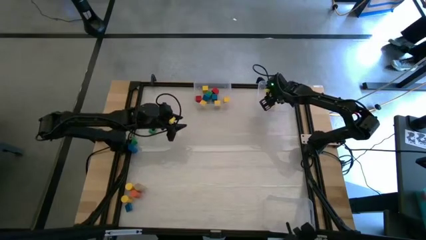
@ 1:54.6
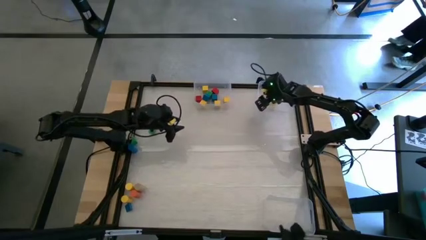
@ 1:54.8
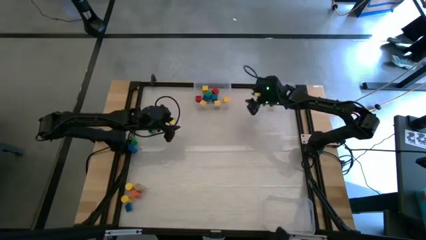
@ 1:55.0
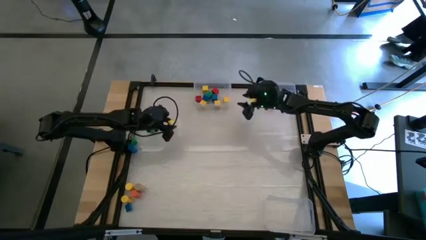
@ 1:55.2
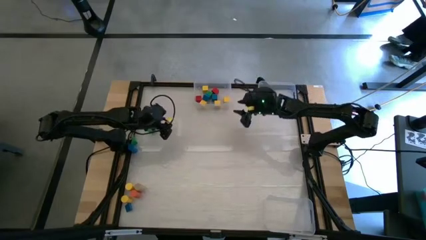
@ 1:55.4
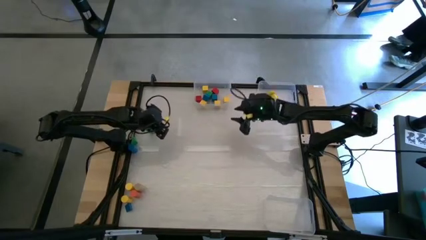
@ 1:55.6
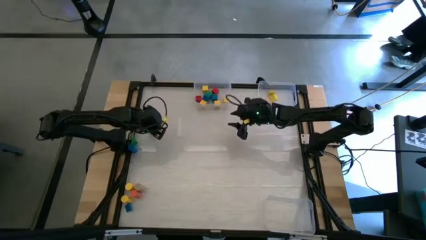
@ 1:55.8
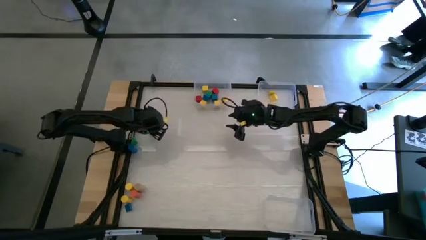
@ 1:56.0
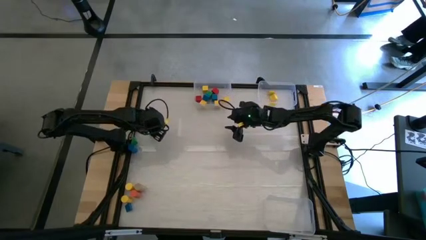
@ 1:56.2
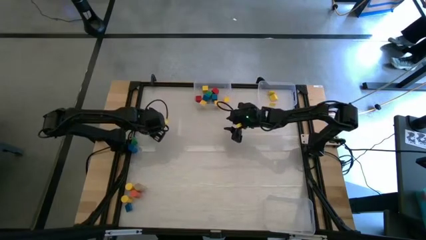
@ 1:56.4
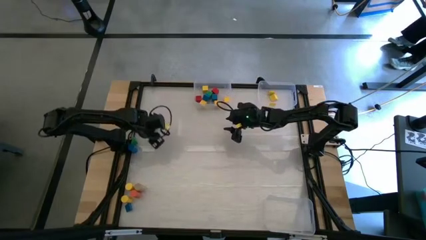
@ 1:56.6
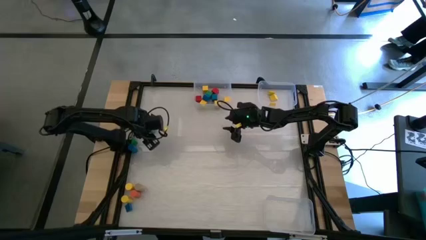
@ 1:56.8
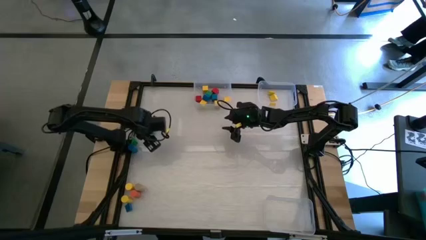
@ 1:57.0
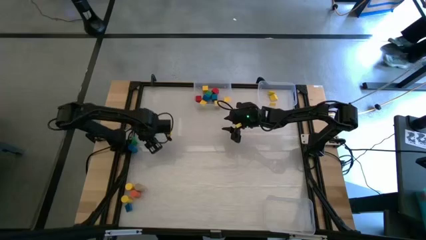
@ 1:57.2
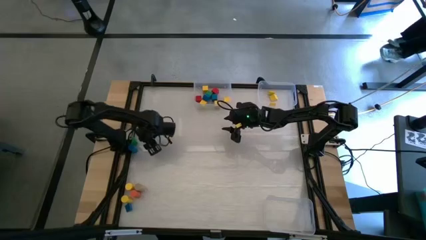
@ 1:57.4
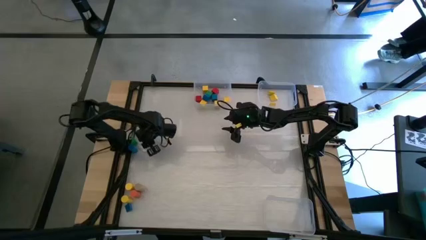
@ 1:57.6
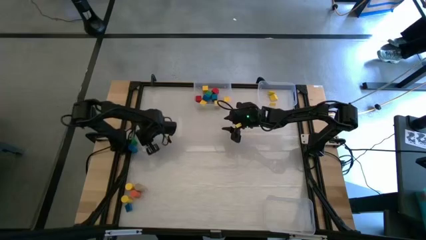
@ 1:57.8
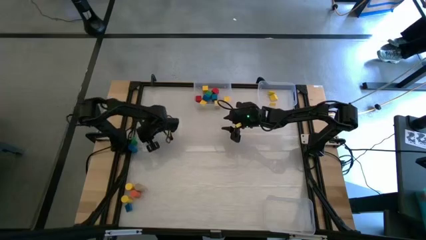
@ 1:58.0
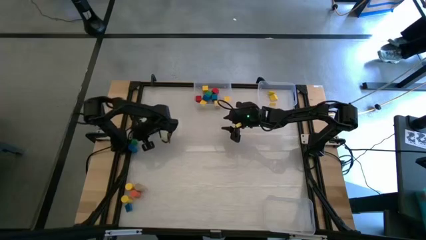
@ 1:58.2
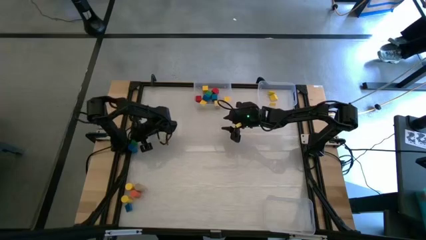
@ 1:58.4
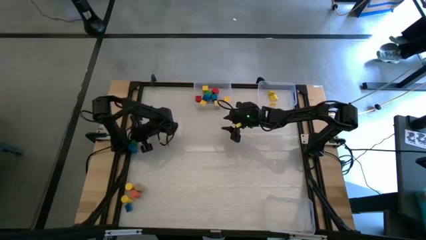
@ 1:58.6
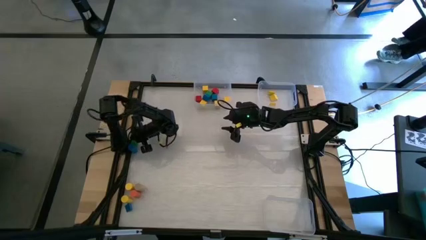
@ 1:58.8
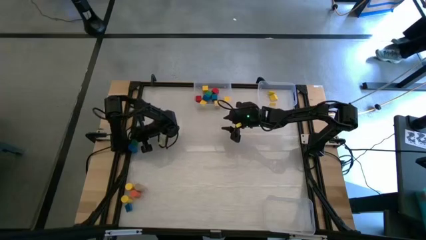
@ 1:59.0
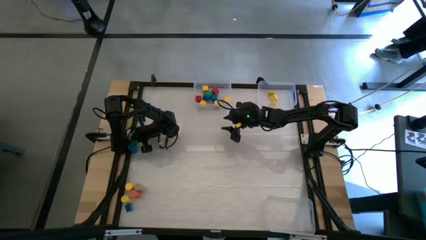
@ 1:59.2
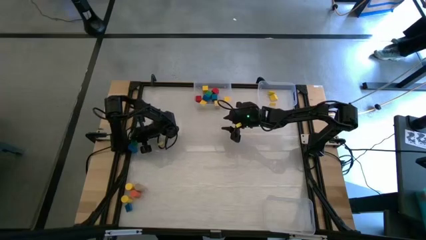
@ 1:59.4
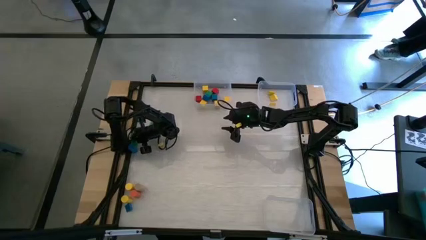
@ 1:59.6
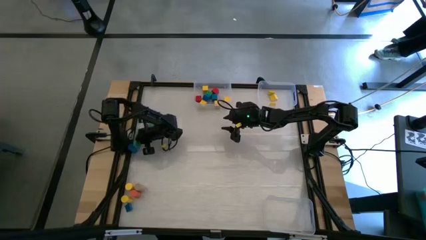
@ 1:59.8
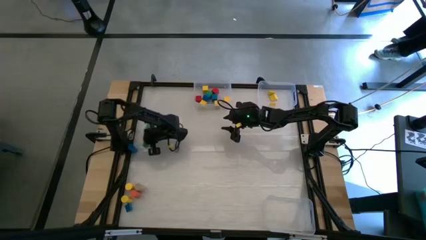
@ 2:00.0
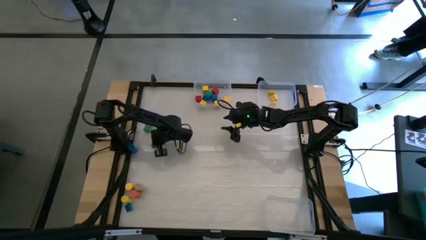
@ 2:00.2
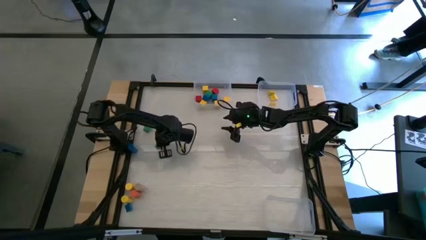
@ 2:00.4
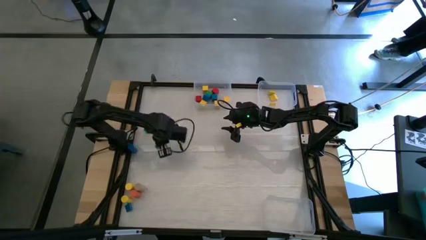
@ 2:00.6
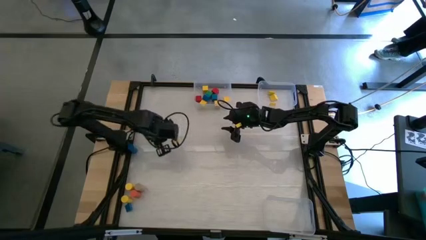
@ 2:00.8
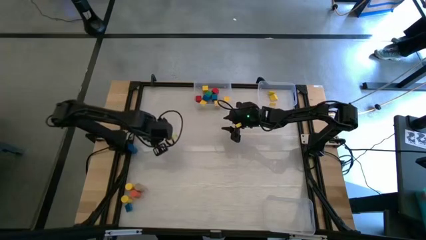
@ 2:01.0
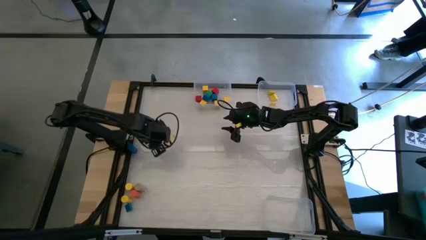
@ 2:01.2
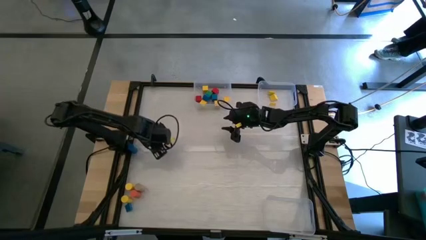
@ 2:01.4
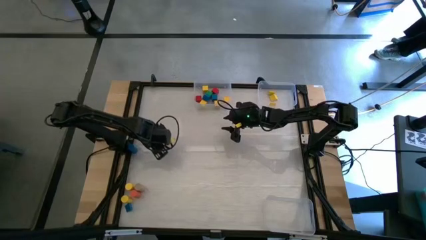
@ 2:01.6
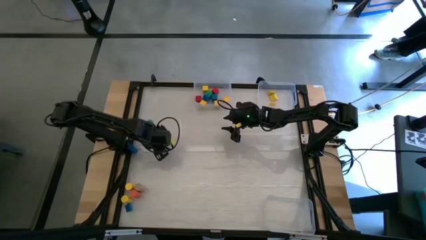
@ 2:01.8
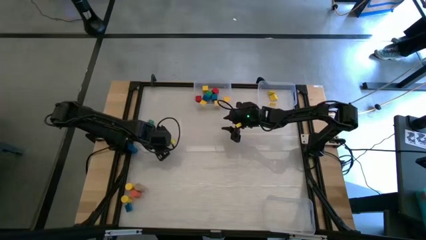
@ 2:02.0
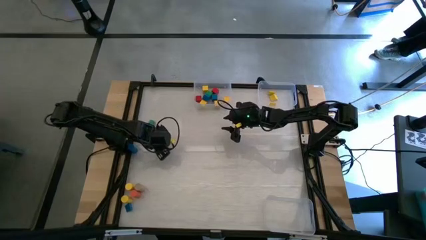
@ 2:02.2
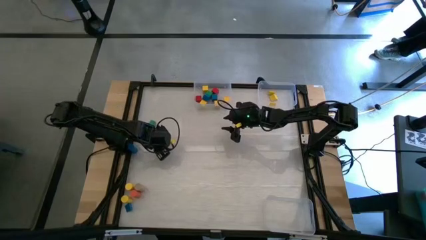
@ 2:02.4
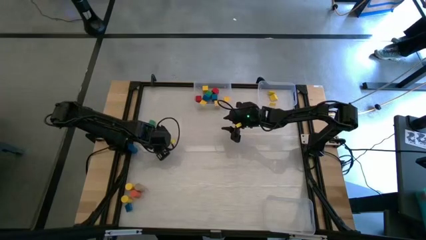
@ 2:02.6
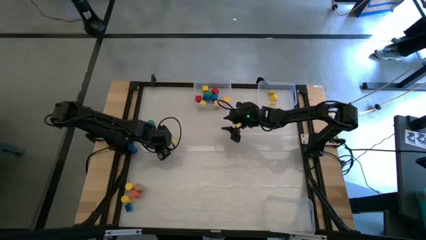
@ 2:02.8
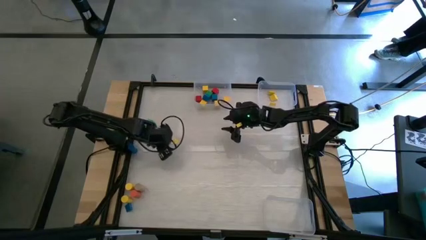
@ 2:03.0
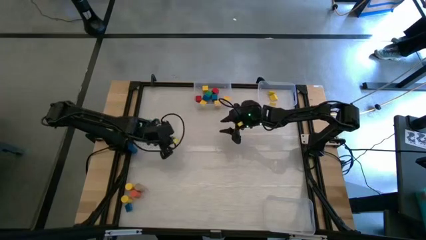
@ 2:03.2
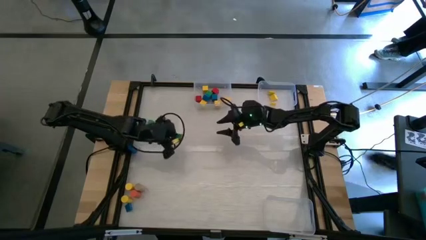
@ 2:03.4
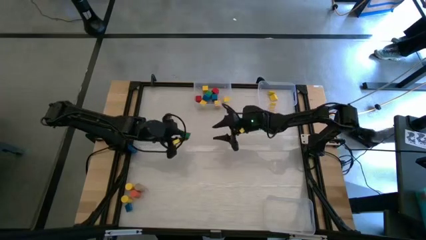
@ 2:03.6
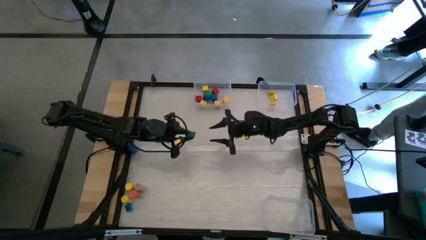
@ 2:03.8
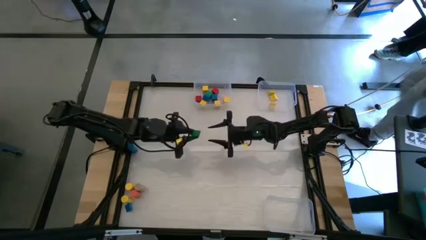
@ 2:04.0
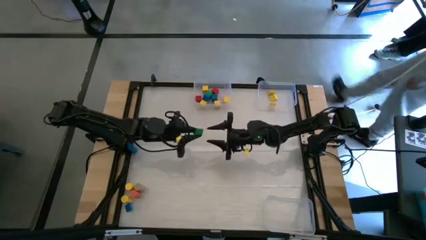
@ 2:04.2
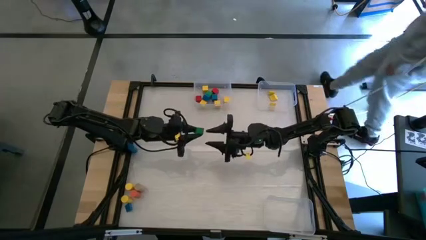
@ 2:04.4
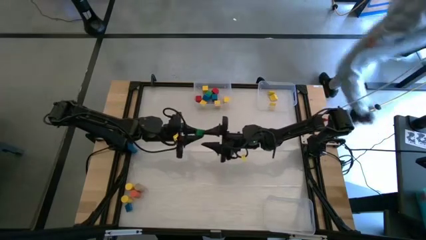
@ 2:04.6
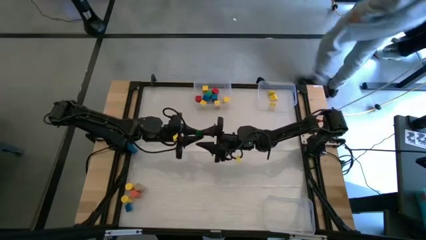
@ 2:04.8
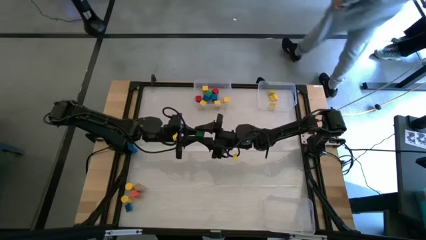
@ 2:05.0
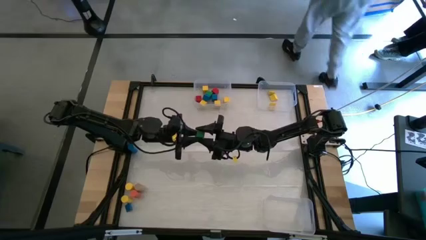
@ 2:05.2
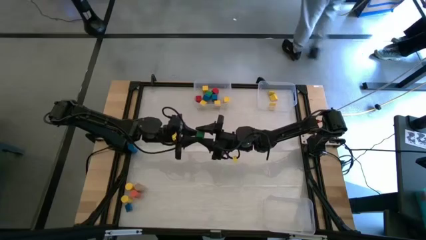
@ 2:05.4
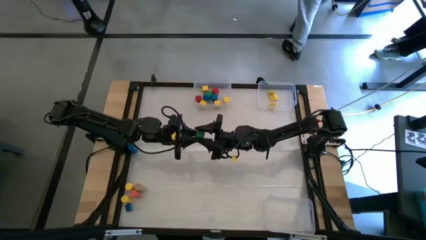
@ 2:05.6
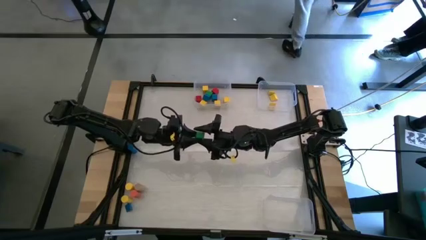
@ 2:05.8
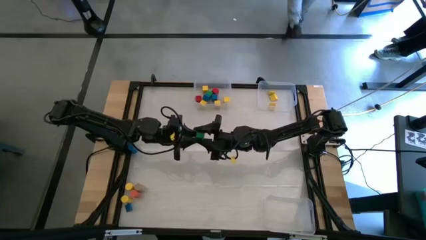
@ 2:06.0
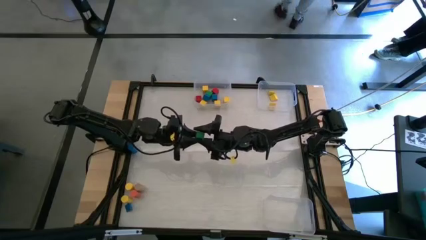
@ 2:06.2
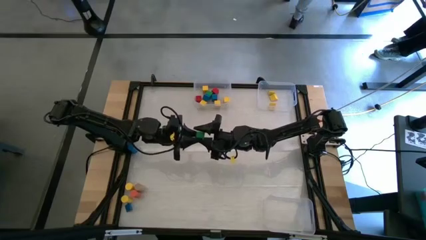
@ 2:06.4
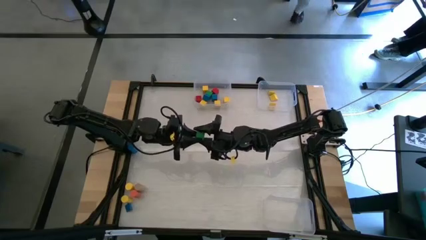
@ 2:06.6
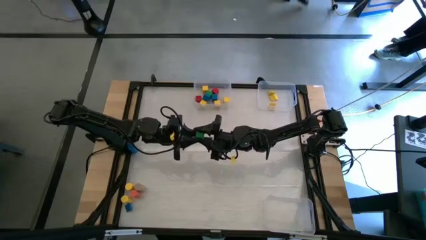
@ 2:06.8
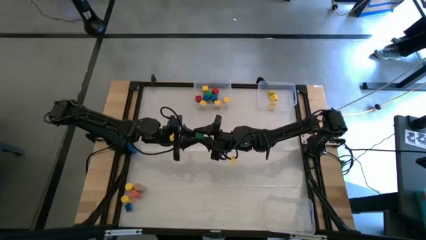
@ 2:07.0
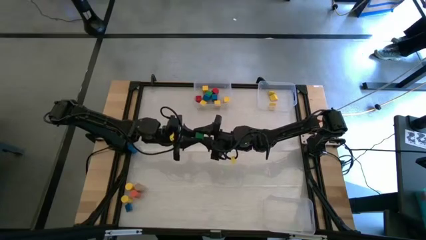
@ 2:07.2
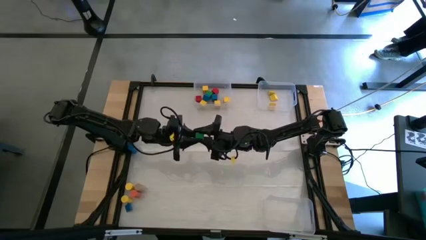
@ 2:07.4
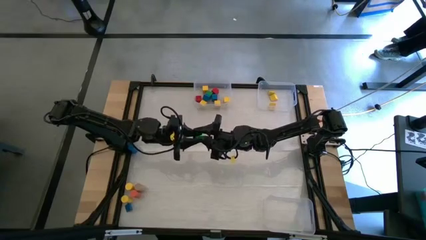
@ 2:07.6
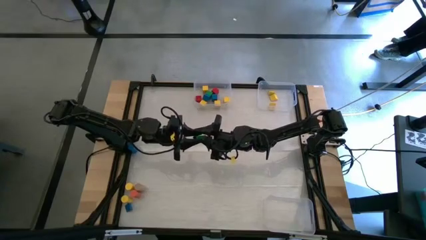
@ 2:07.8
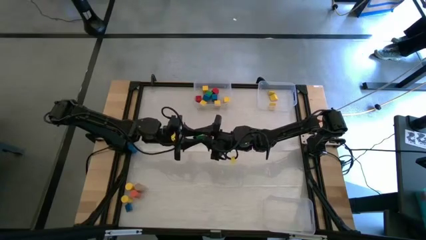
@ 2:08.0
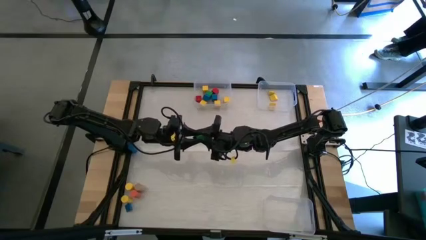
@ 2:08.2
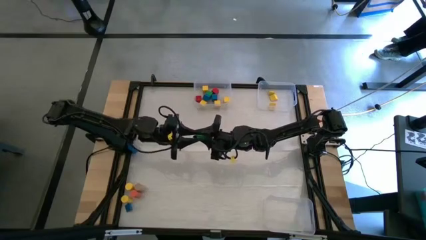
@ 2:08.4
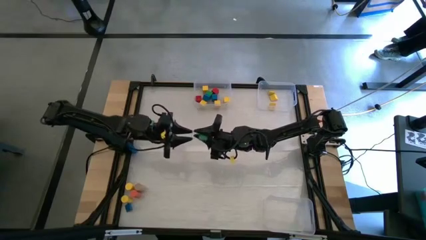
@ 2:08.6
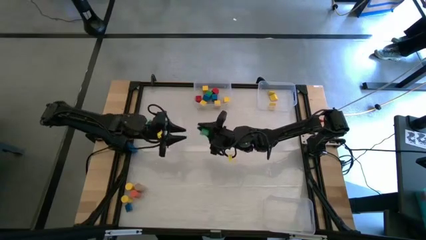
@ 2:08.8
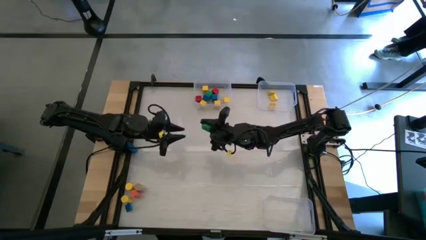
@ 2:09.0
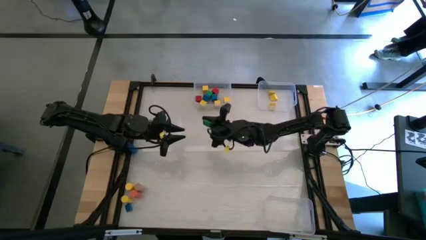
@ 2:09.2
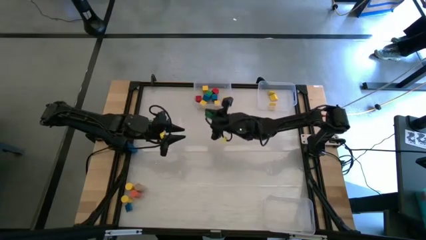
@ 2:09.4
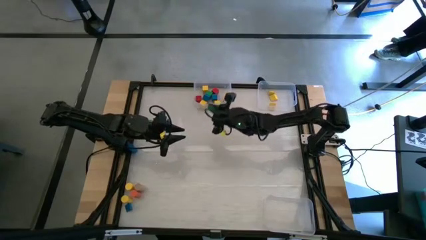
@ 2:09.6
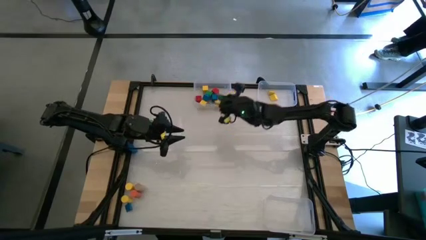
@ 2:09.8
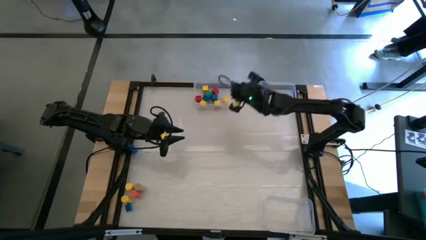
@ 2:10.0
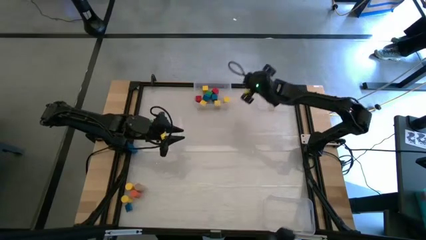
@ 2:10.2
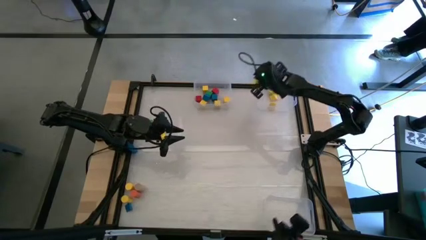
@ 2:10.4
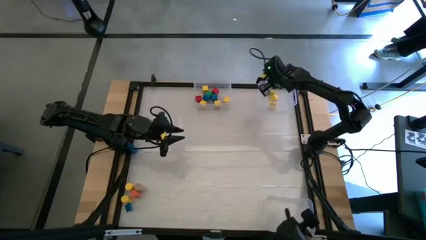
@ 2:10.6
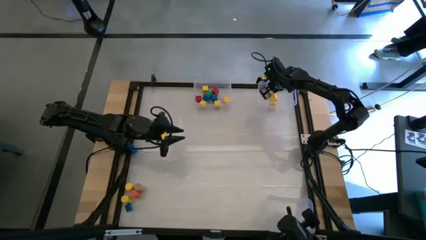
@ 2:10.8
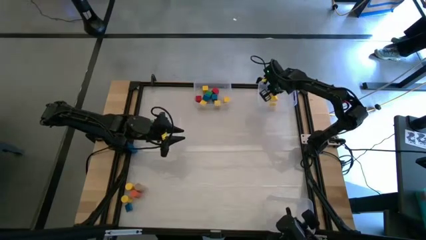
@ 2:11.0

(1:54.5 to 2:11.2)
Task: Sort blocks by size
Put the triangle green block into the top right transparent bin
